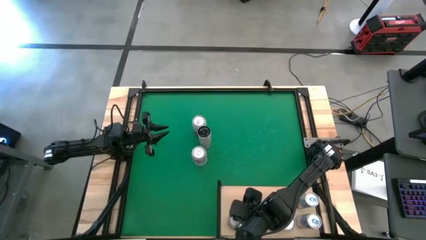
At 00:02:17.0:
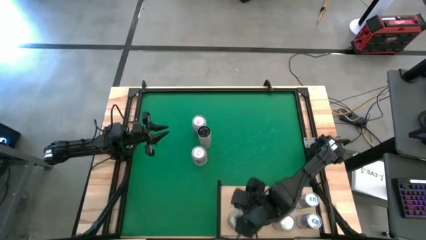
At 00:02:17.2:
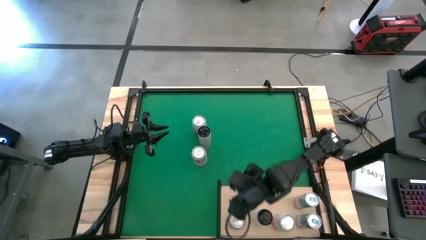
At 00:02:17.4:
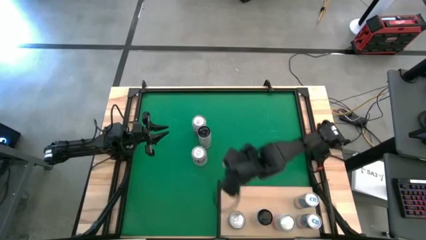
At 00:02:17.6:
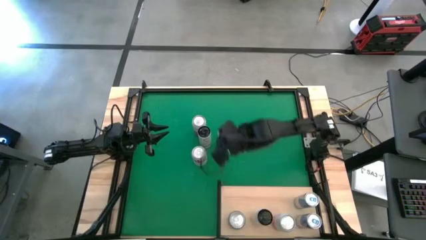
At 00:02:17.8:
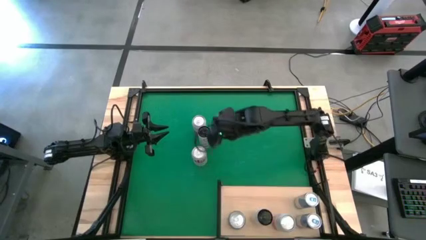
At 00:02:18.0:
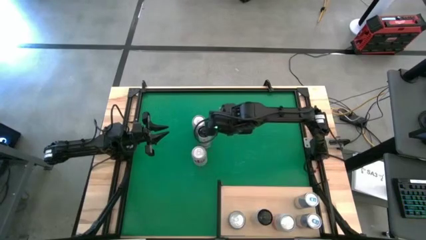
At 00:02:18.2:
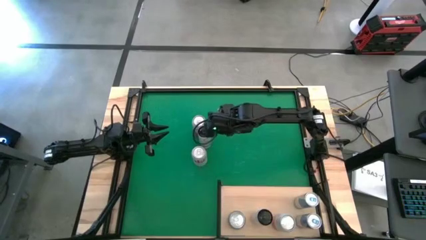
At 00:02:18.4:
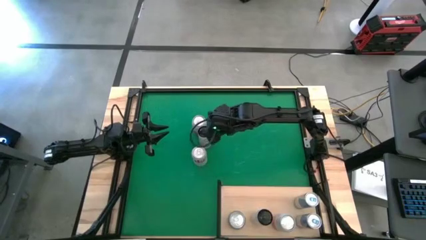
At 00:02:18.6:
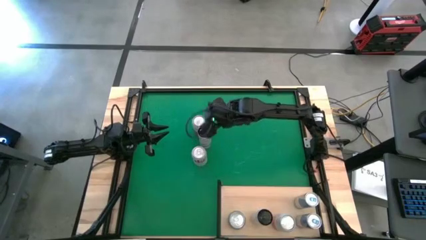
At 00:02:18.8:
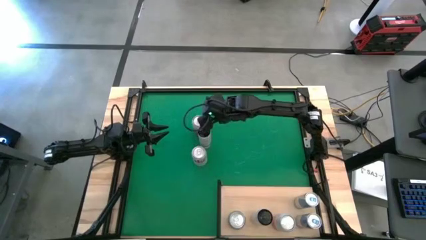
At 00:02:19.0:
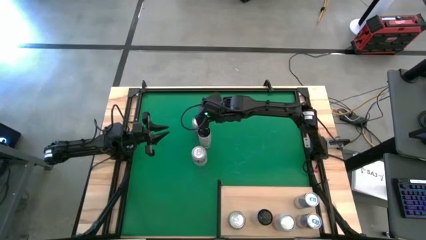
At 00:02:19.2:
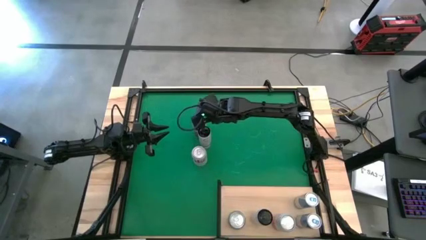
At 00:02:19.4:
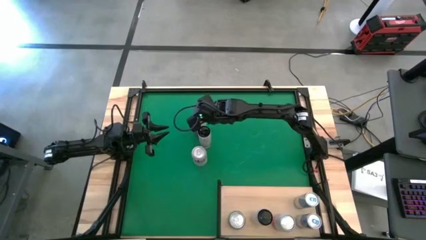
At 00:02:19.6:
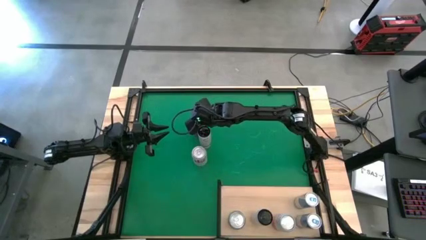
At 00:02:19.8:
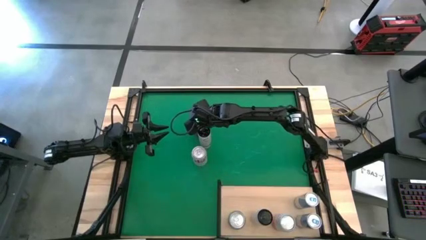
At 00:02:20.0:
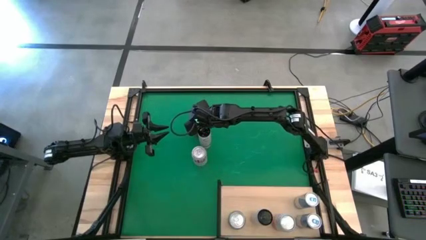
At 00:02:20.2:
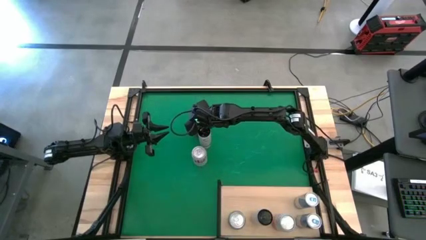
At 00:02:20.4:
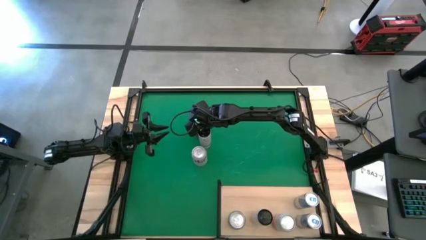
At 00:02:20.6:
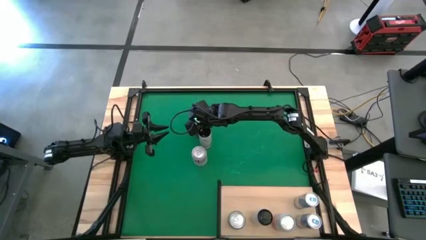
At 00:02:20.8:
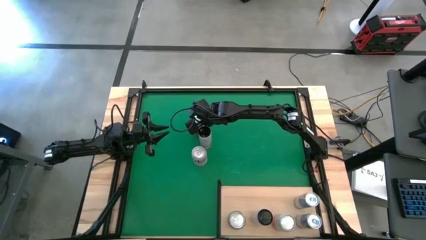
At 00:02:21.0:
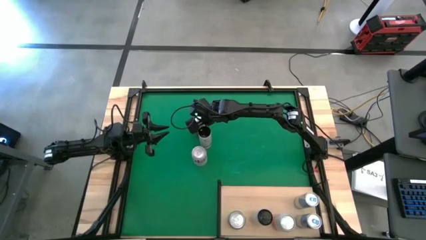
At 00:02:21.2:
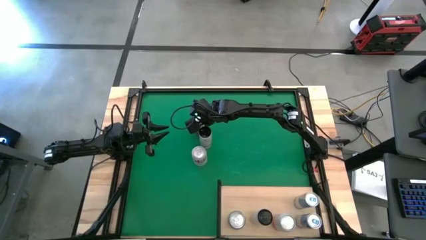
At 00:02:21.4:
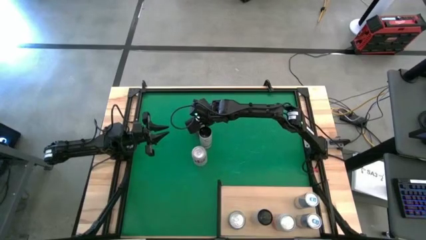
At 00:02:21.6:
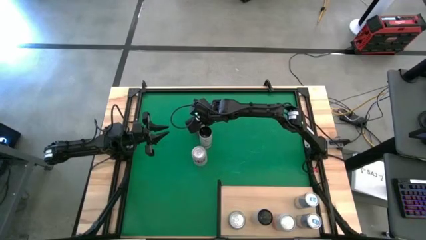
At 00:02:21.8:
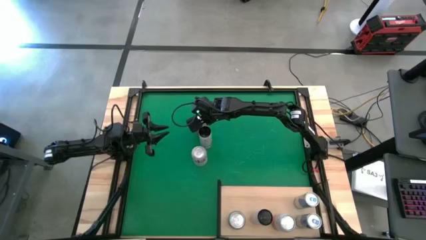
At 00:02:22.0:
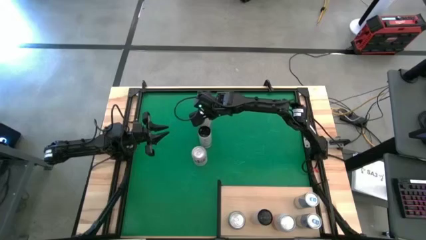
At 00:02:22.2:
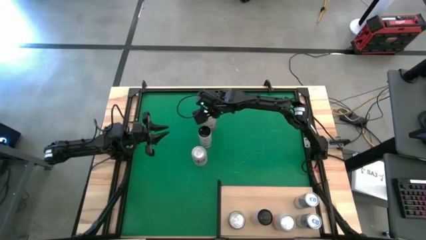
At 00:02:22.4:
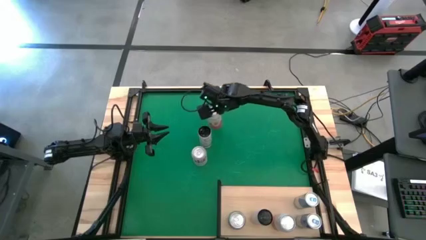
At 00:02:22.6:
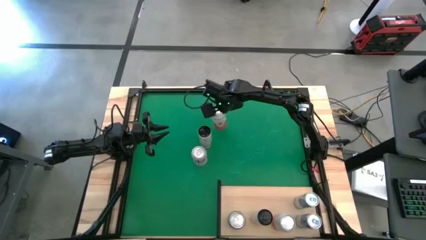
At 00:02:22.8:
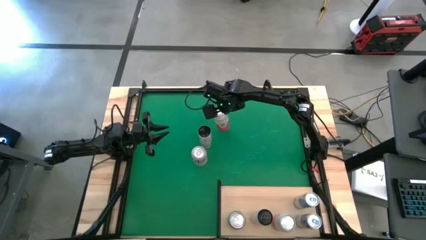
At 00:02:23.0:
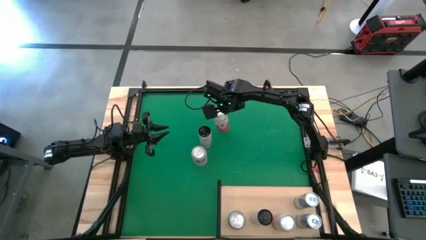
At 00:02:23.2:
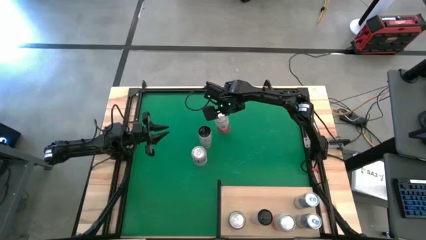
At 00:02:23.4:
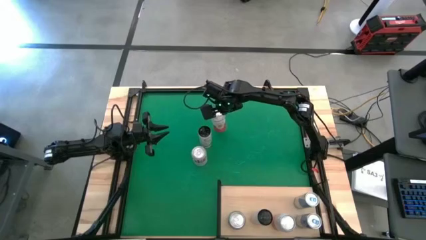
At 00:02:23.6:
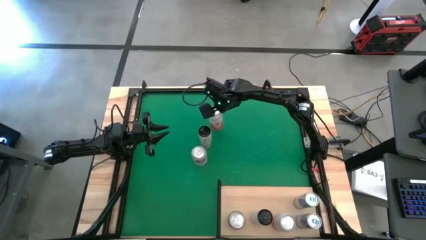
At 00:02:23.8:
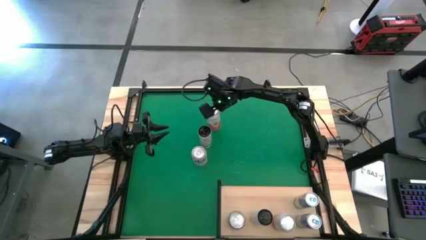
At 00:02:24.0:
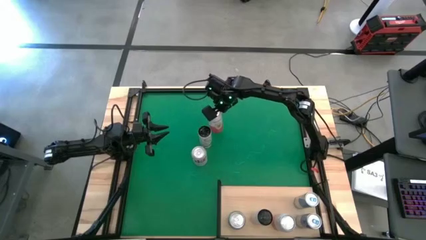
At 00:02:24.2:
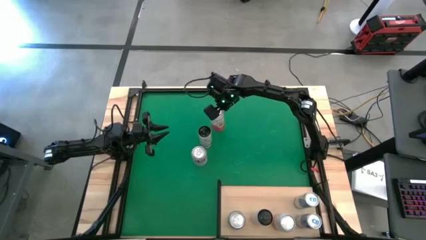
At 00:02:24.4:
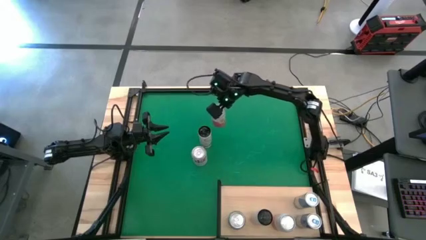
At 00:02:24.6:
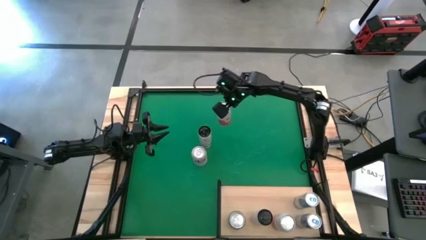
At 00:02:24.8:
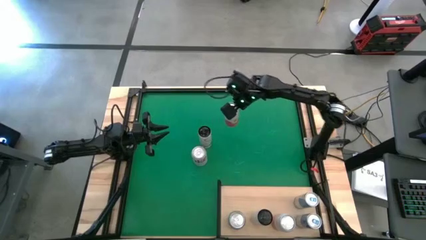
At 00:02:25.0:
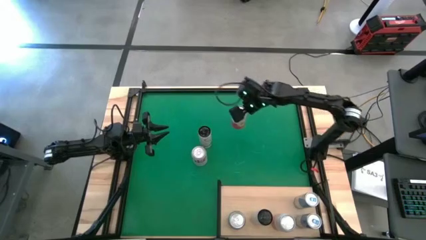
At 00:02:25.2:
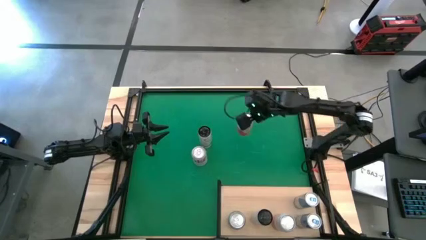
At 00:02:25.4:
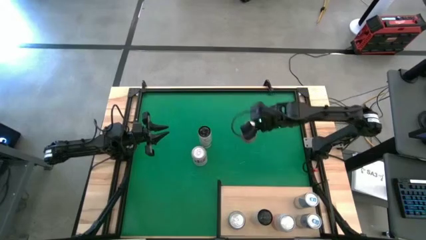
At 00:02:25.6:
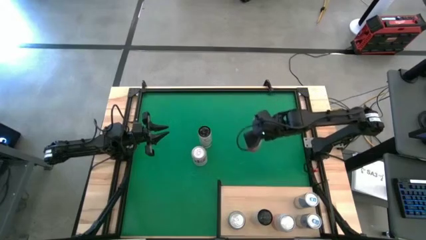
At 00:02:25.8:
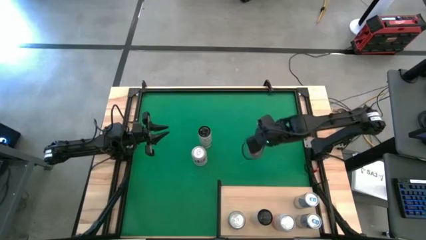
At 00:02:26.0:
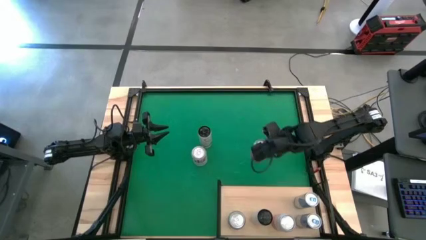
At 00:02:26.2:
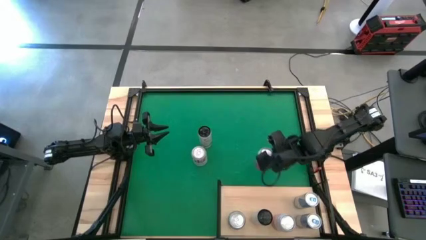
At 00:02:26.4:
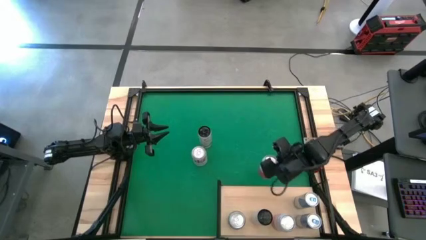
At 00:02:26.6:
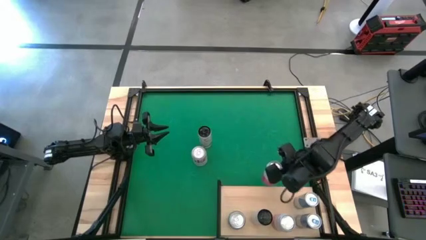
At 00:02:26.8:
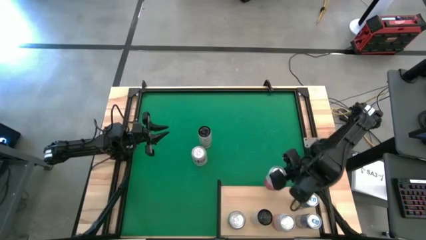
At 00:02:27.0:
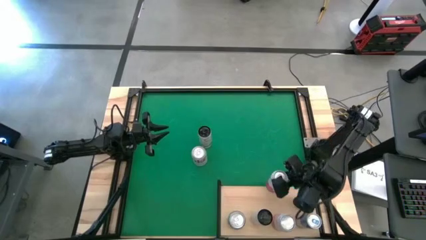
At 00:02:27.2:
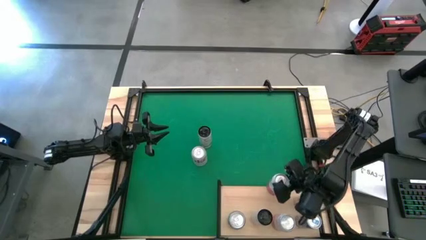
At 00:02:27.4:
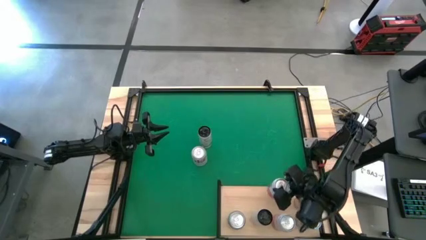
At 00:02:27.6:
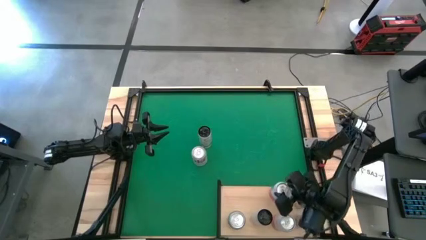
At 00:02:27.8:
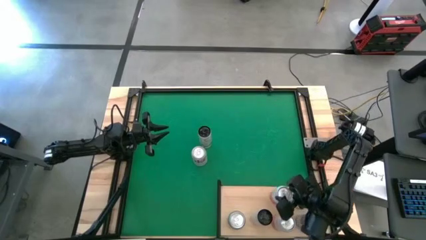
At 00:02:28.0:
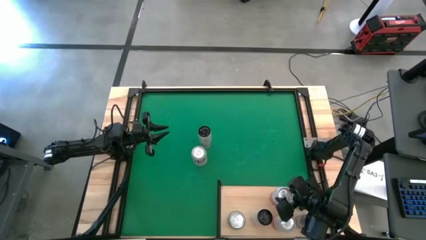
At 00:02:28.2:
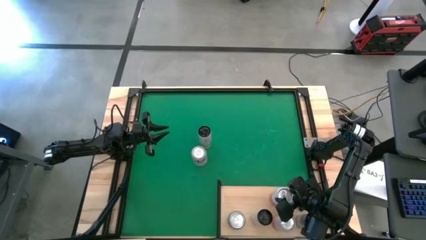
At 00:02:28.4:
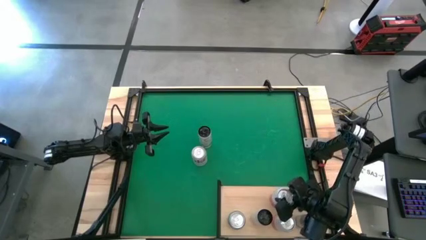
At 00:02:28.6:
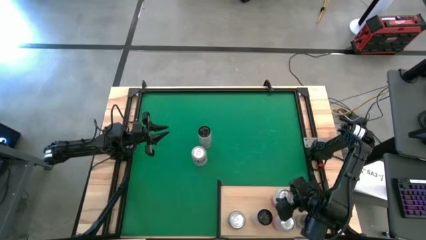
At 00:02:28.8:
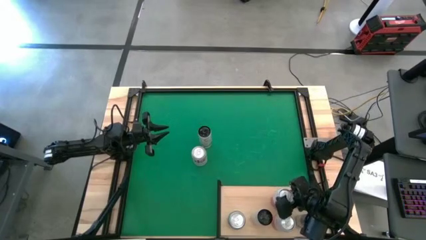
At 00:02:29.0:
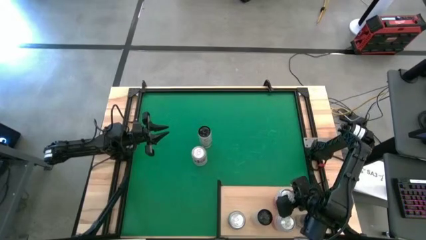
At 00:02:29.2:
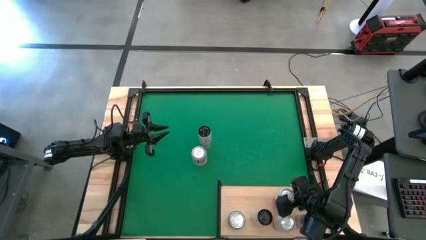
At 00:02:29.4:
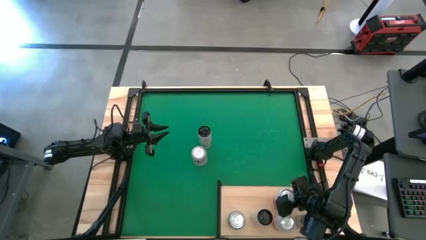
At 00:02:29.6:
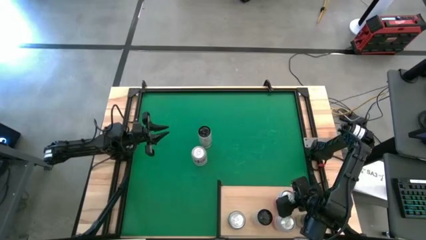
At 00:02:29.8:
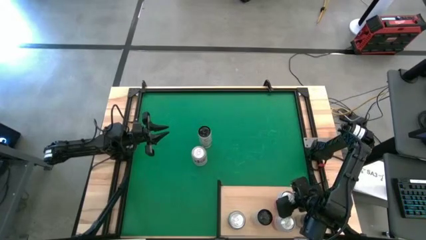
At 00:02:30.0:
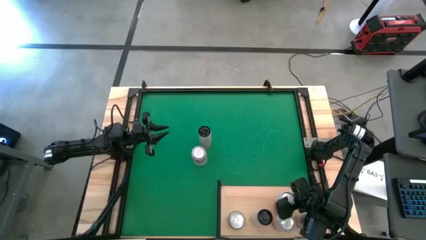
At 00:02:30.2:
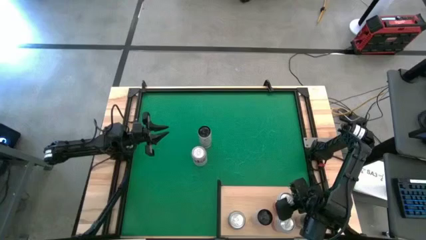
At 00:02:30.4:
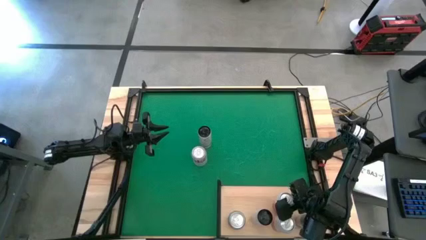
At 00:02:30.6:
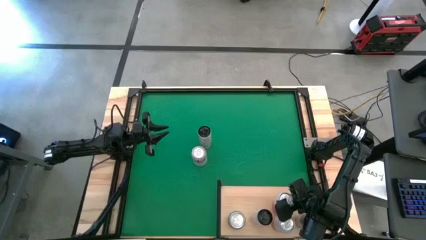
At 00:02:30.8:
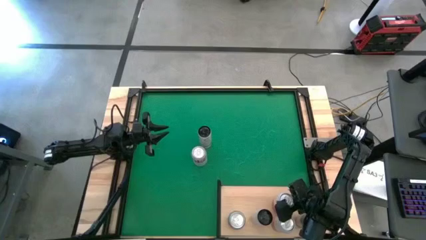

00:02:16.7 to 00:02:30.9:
Task: Place canned beverage on shelf
Put the pink white soda can on the shelf aligned with the other pink white soda can
